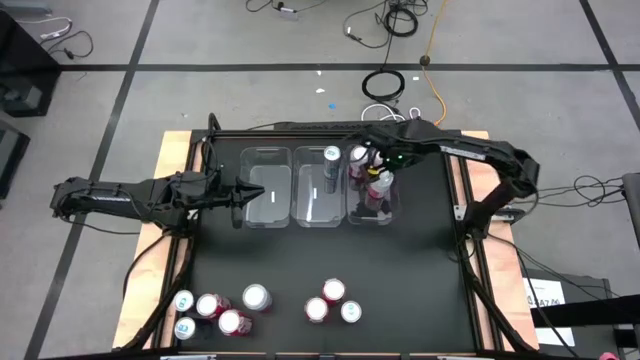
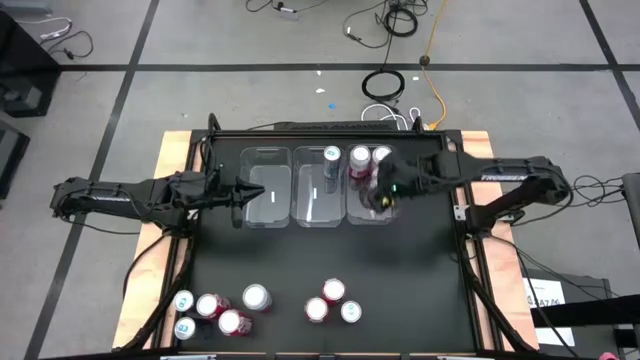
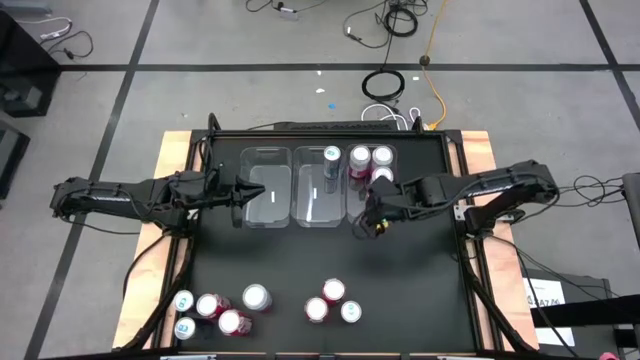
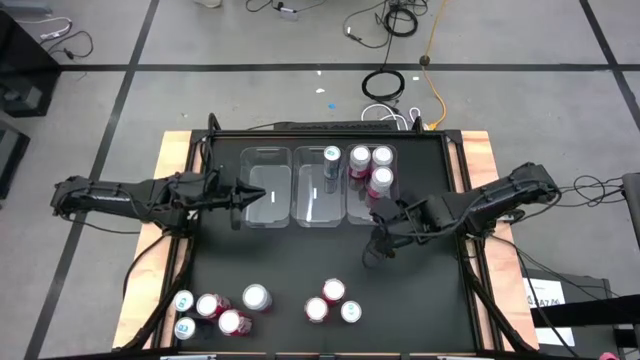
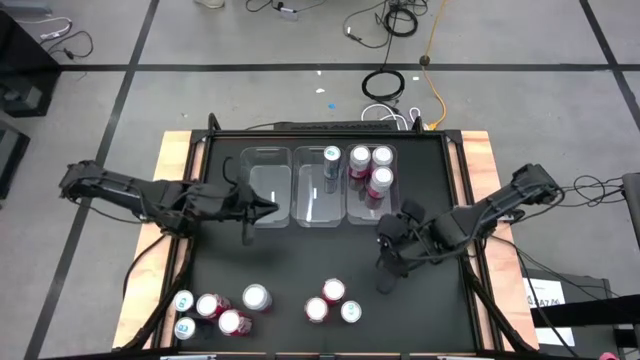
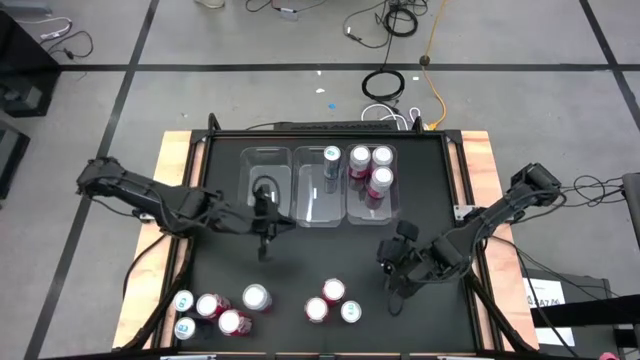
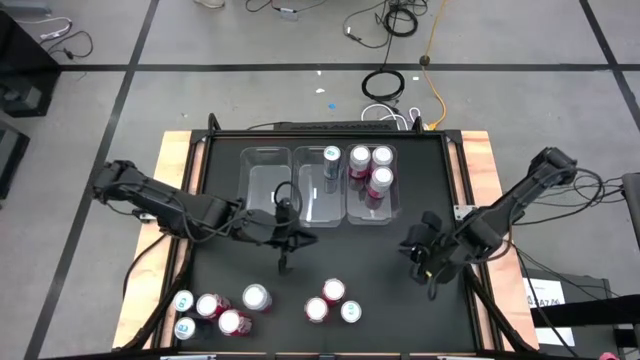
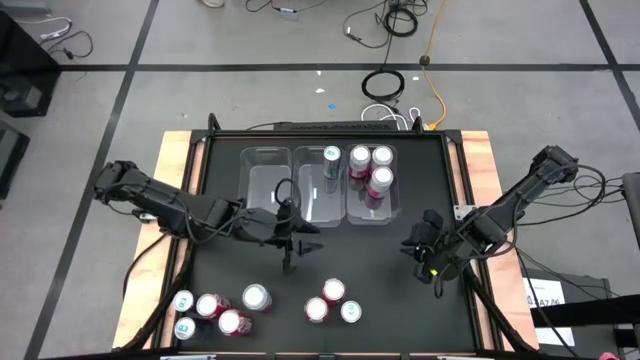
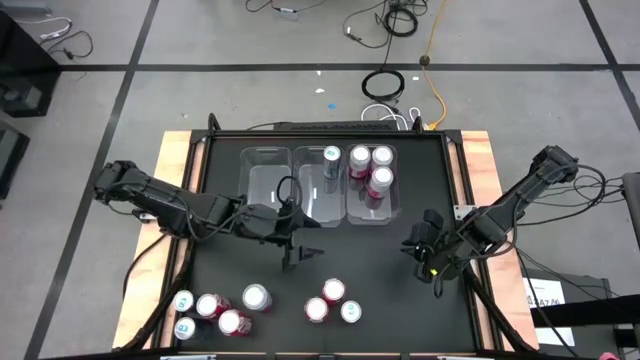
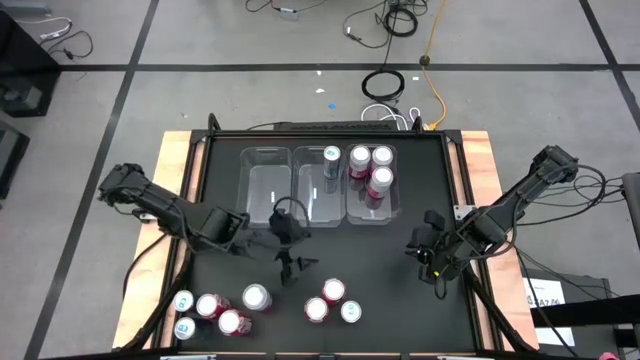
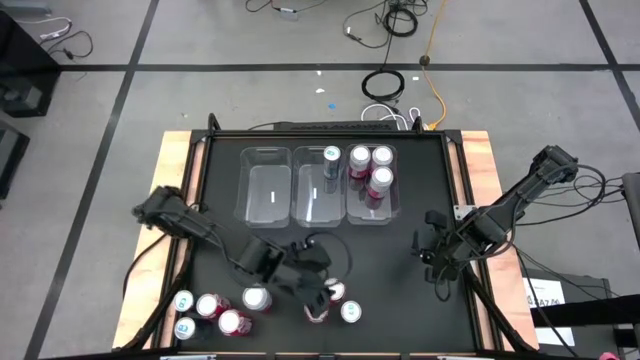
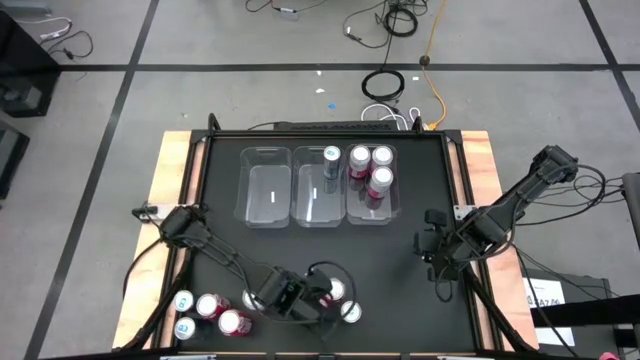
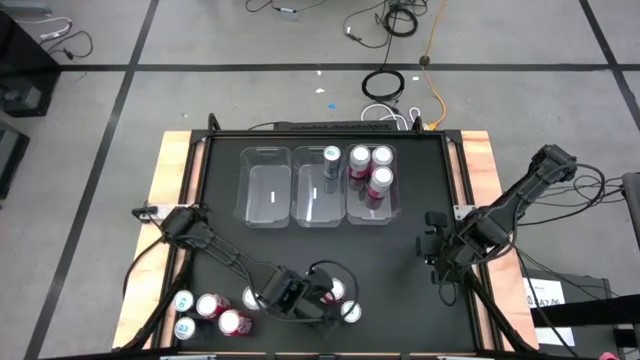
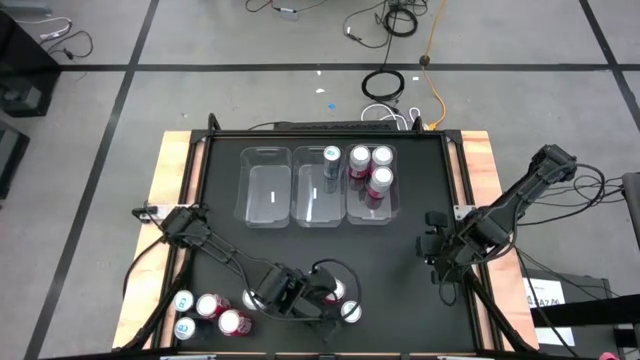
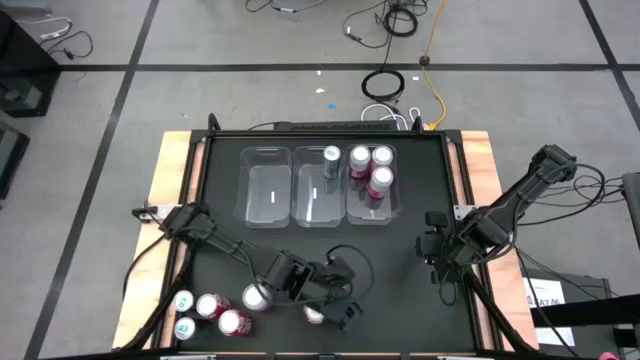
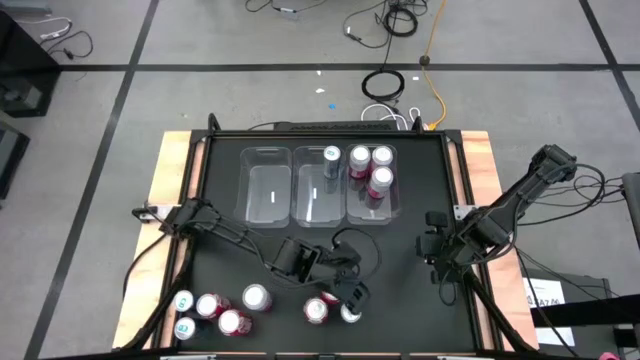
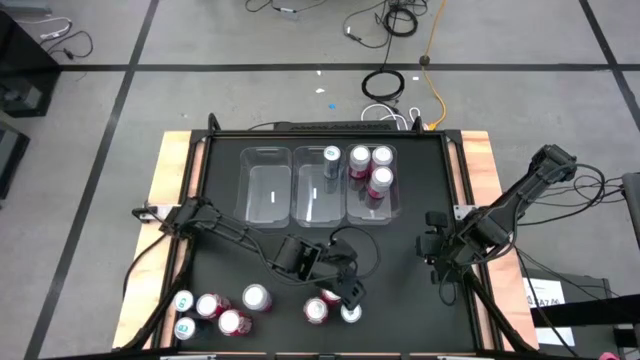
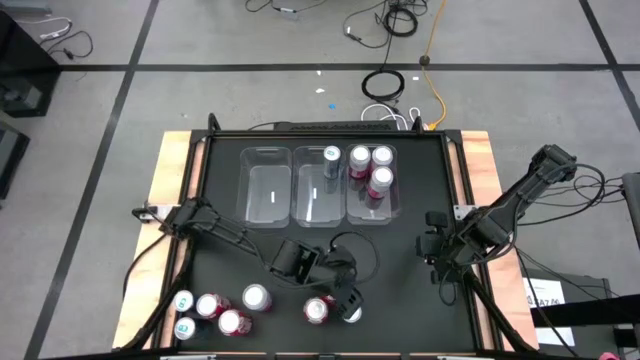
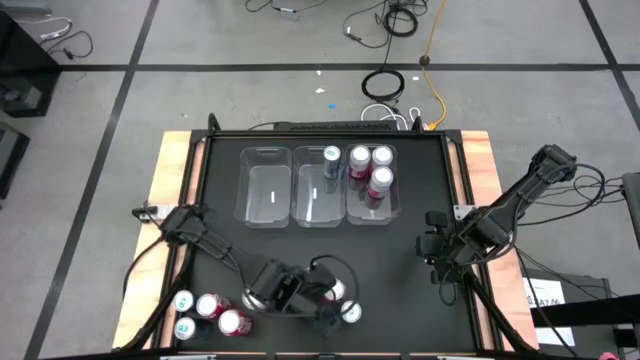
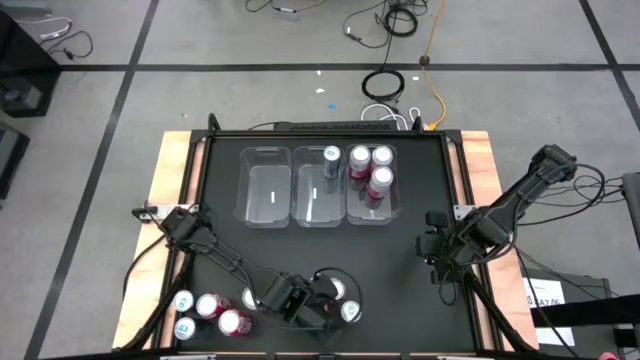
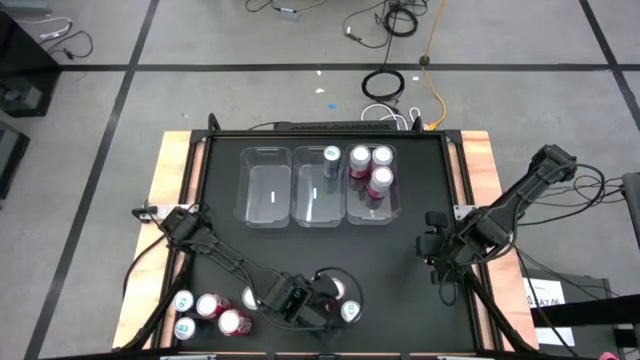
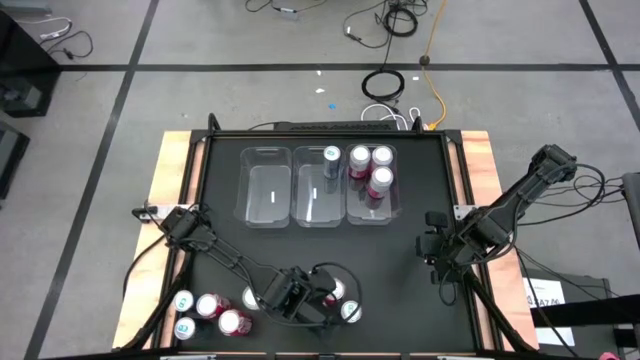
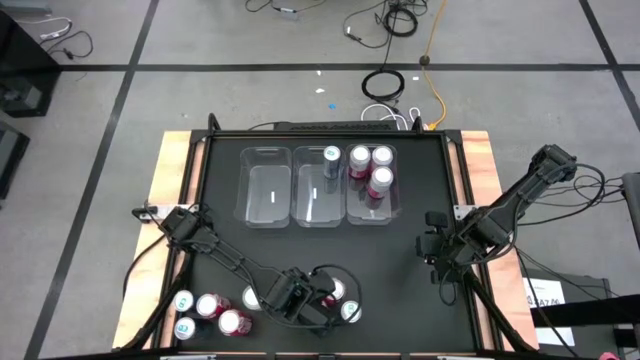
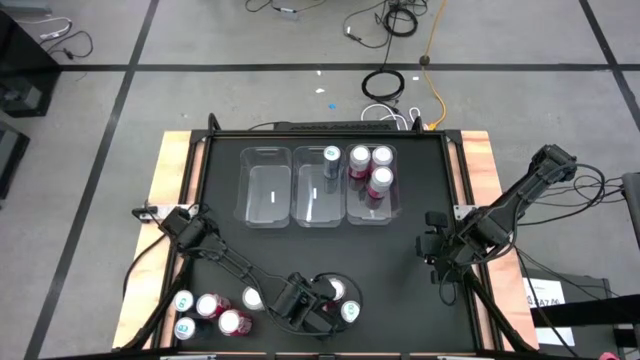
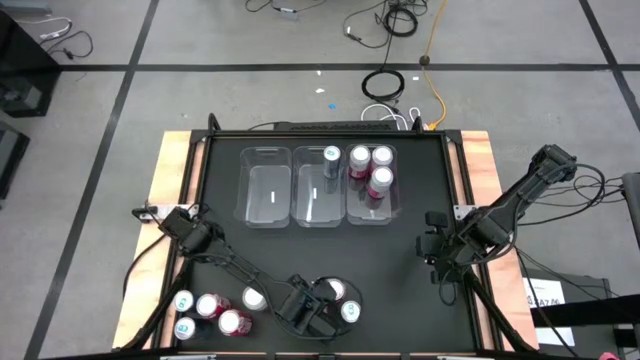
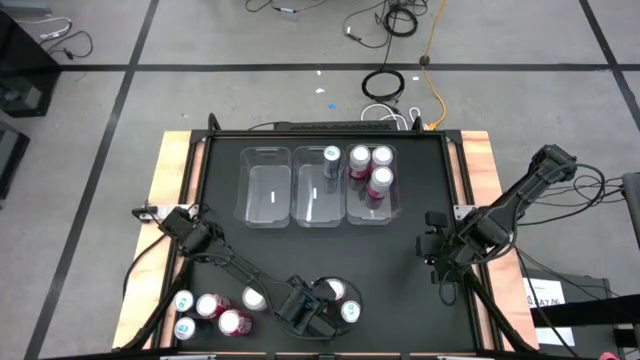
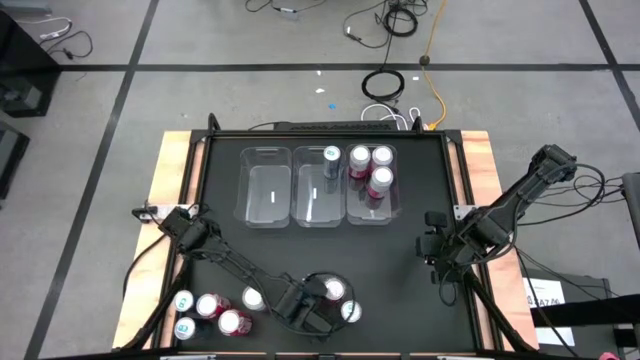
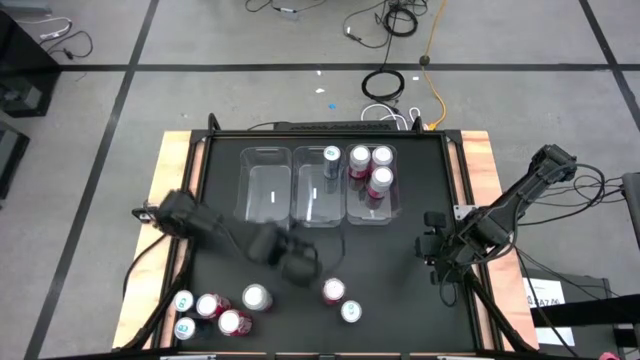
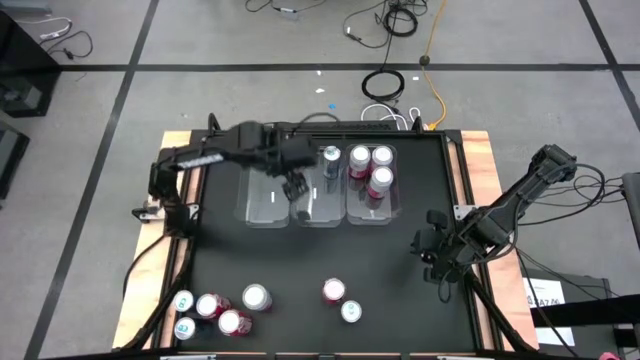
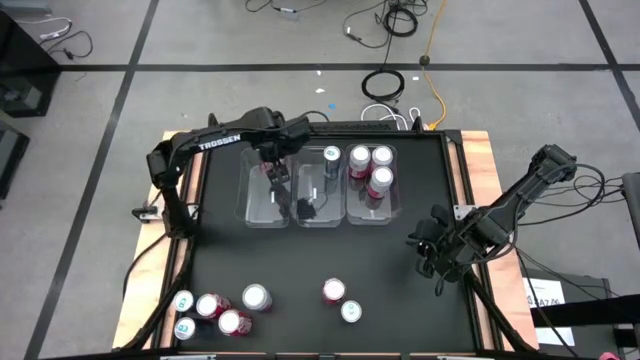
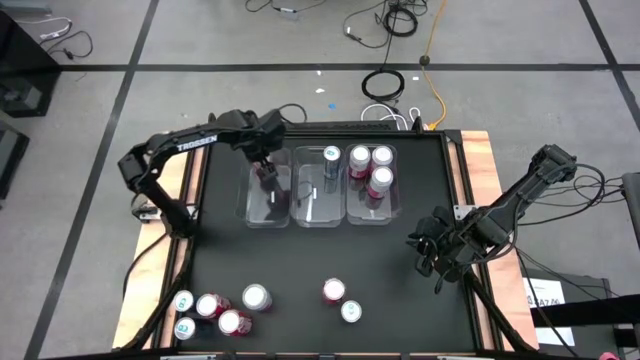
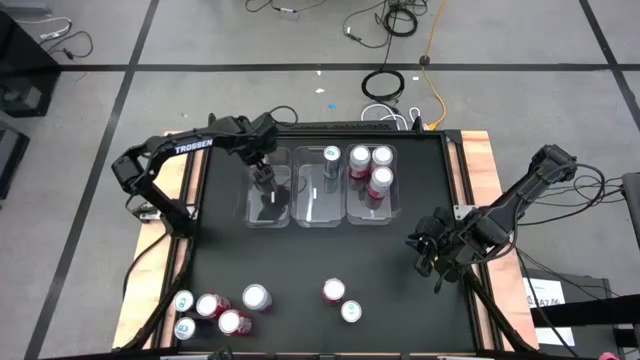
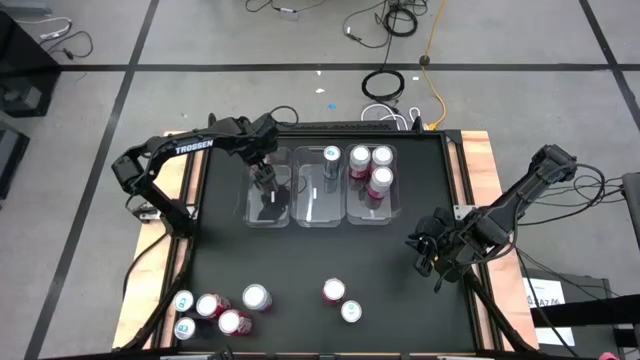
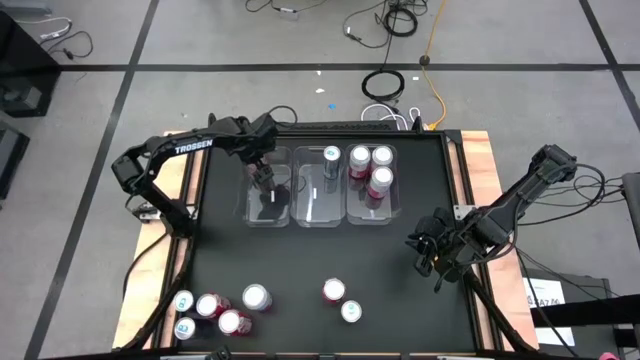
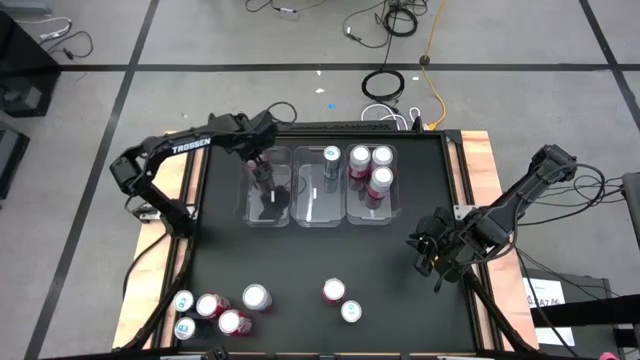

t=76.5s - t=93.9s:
Task: Sort soda cans
Put the red soda can into the left transparent bin
